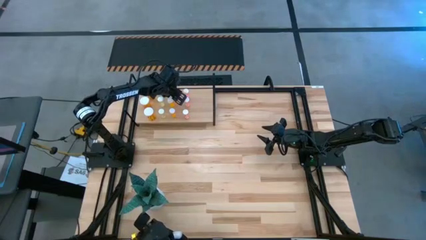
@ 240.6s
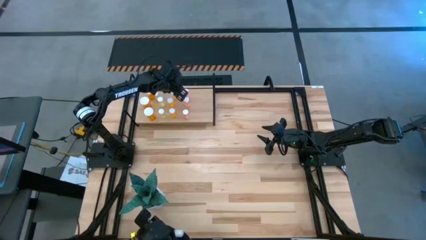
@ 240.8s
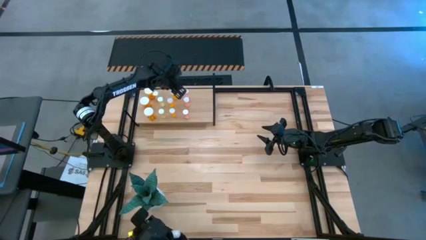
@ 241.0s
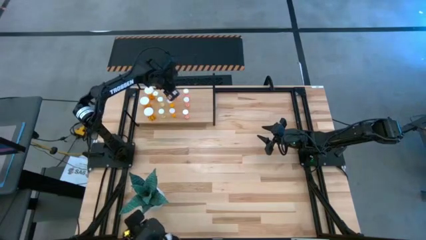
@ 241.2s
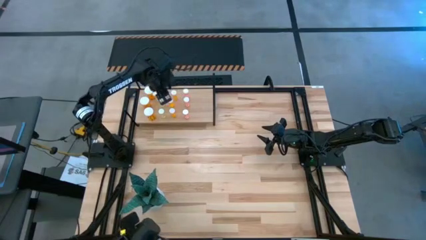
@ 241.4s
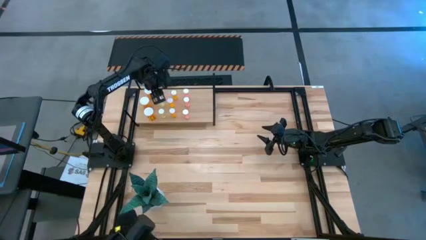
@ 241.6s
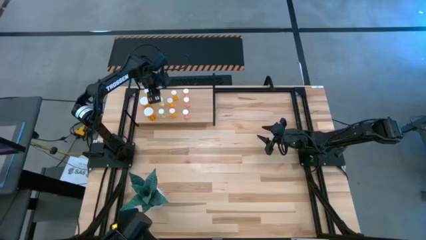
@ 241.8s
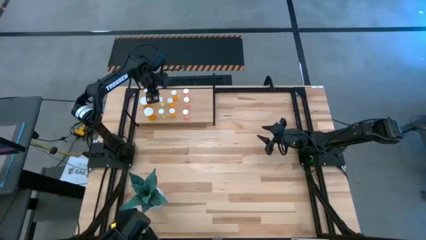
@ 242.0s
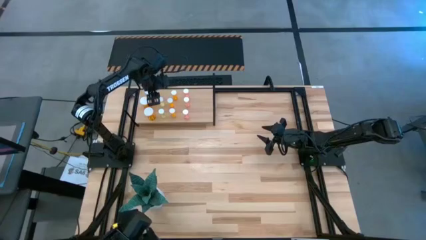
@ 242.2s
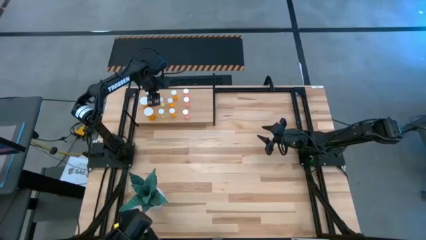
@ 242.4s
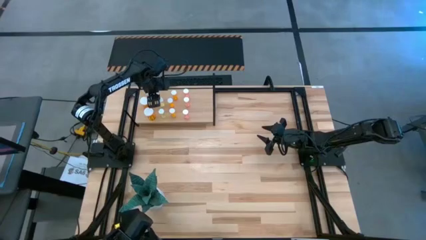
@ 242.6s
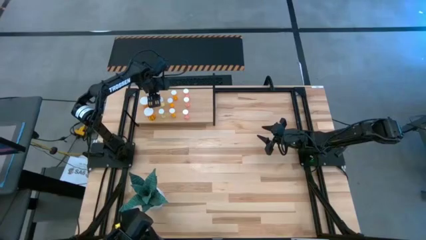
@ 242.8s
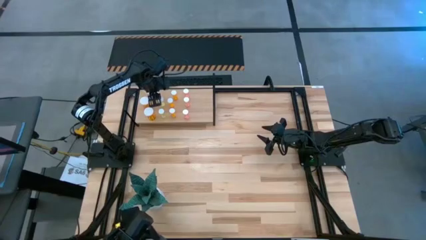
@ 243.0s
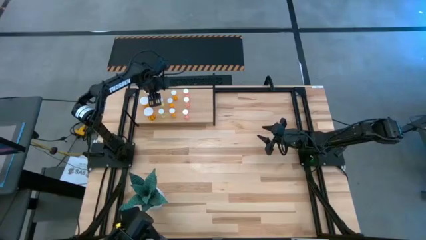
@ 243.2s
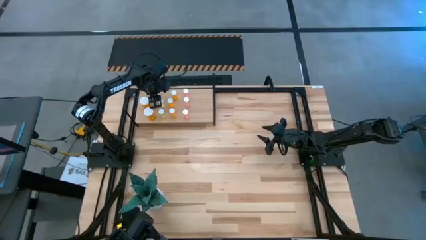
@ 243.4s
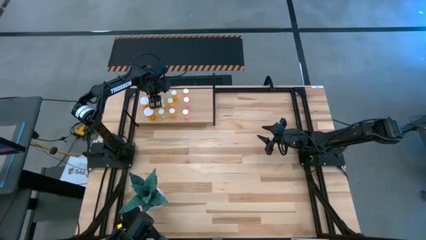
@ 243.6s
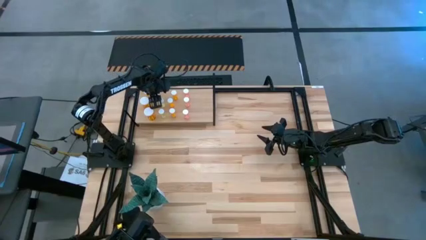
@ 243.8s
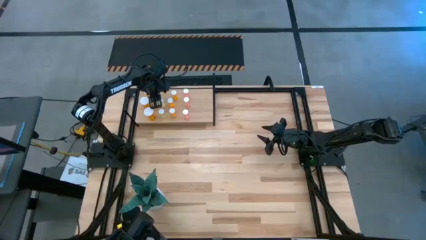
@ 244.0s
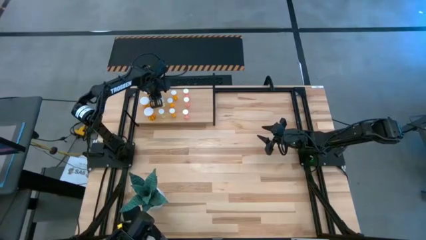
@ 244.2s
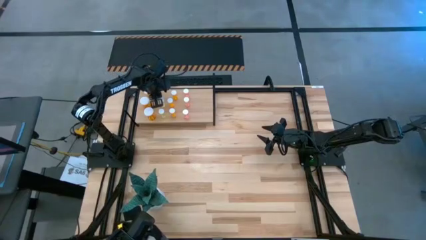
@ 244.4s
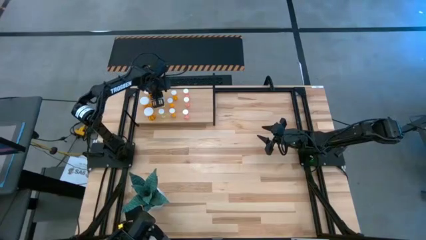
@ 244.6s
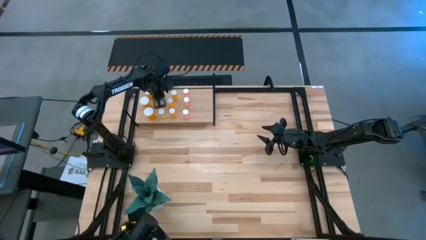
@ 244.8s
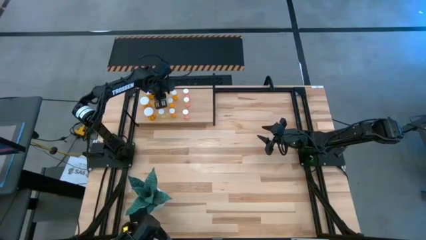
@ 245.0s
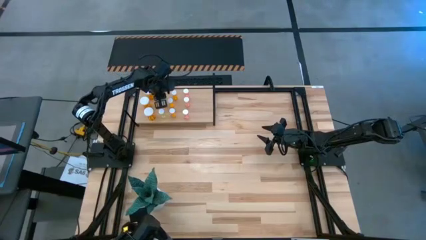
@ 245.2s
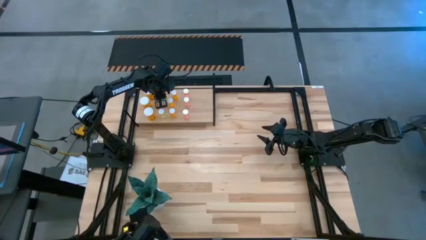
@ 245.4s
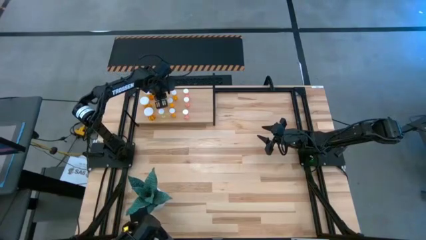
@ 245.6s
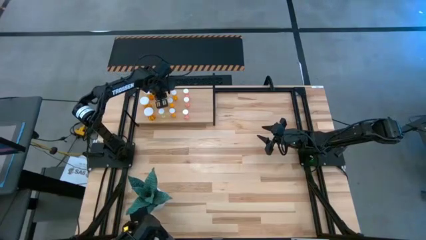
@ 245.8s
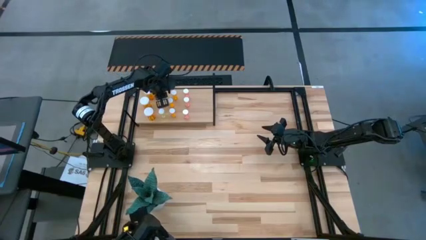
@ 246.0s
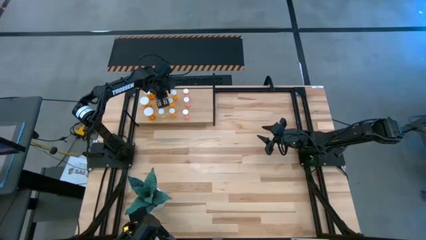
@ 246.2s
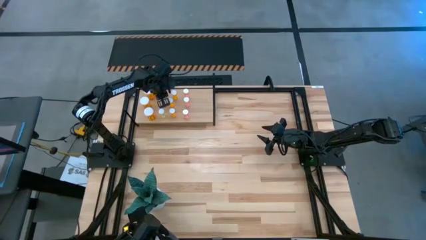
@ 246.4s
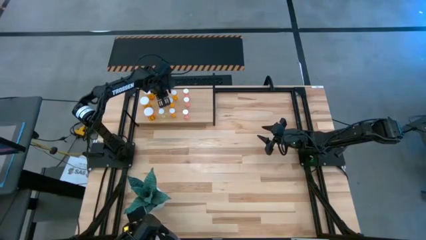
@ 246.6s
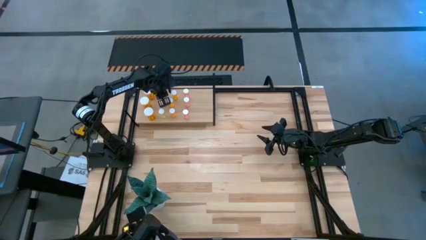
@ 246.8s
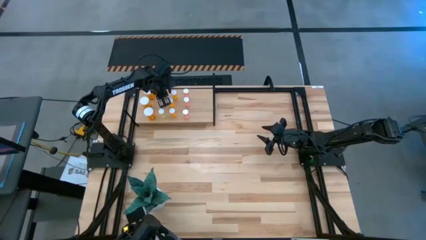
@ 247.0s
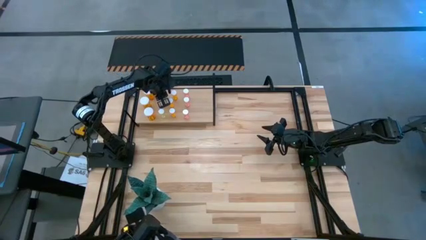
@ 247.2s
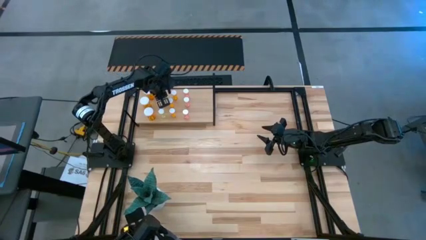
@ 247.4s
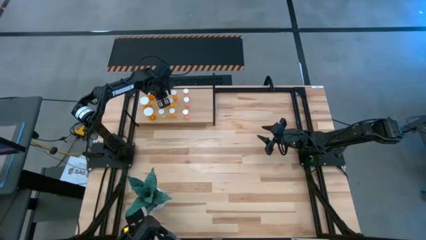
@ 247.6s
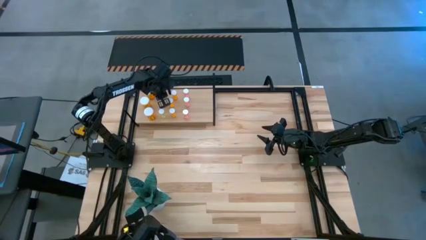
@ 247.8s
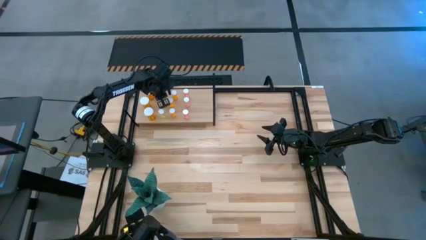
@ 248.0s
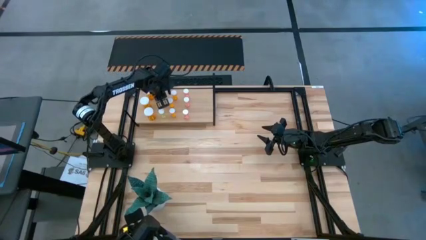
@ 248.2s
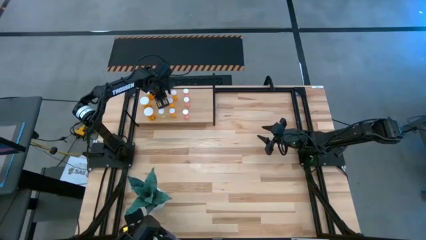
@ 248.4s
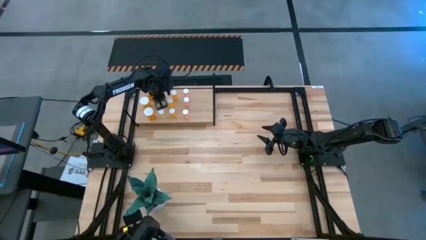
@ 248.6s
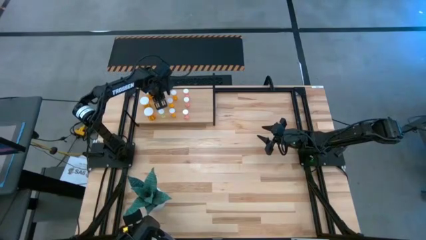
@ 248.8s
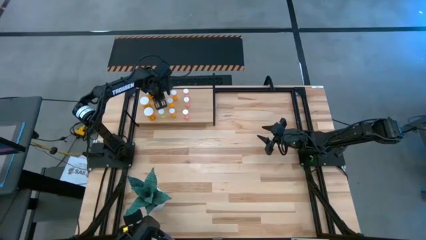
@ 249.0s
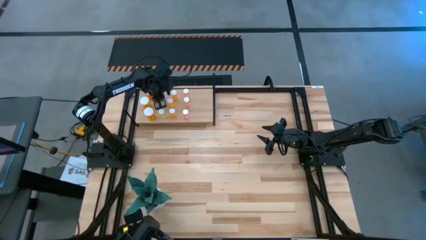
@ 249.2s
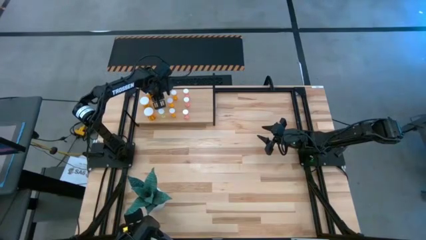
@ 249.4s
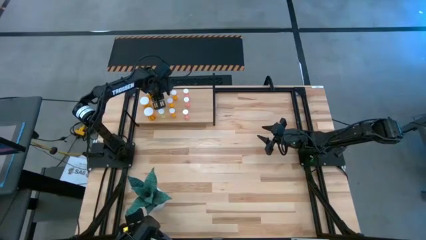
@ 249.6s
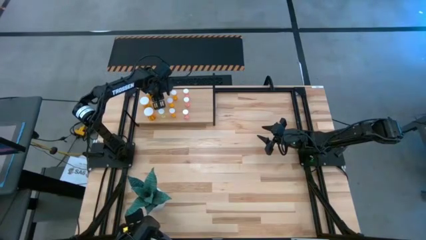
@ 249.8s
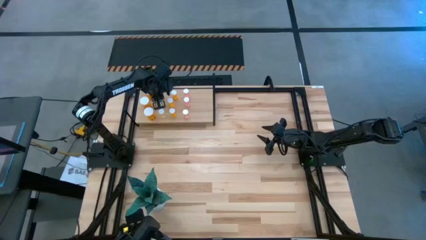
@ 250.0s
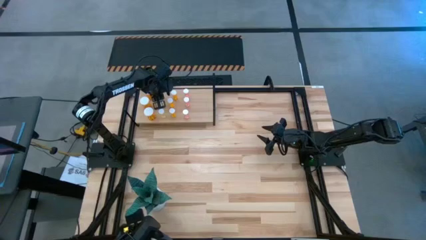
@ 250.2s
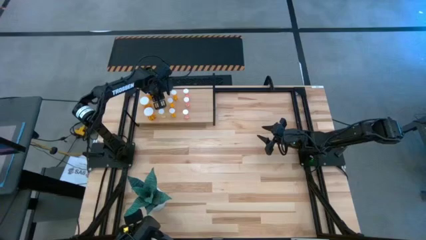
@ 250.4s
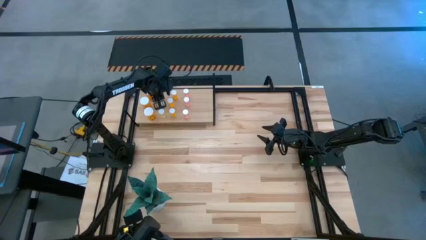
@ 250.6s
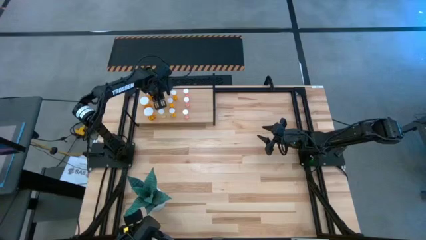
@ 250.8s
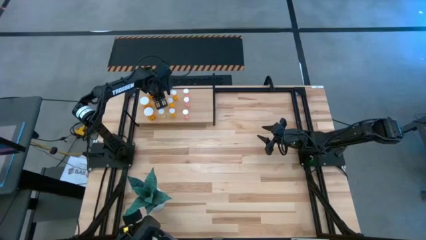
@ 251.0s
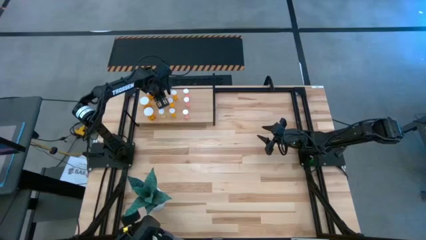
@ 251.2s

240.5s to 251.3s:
Task: Pick and place medicine bottles onto shelf by color
Adjust the yellow pill bottle on the shelf
